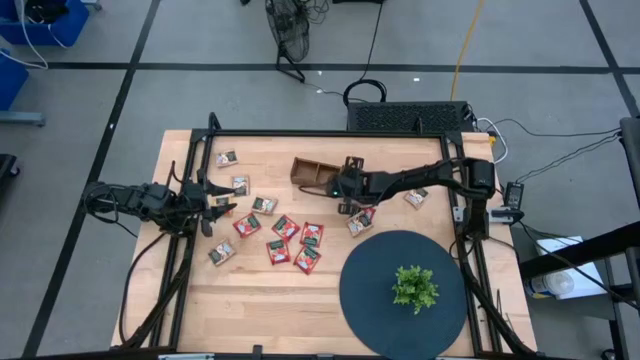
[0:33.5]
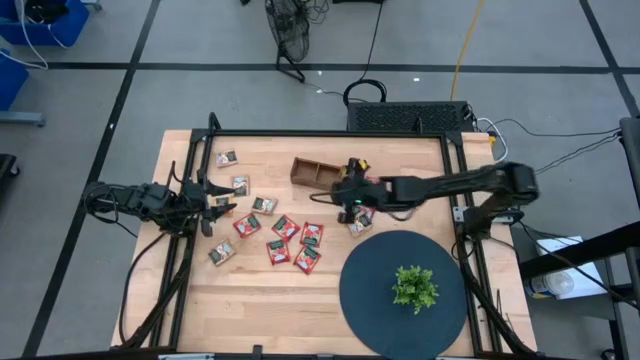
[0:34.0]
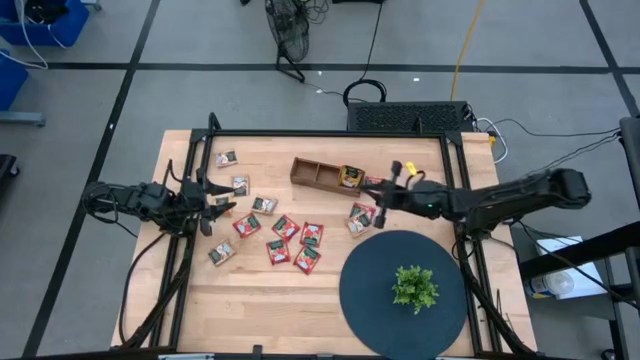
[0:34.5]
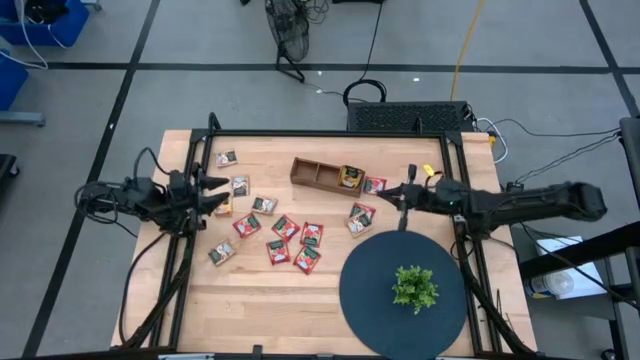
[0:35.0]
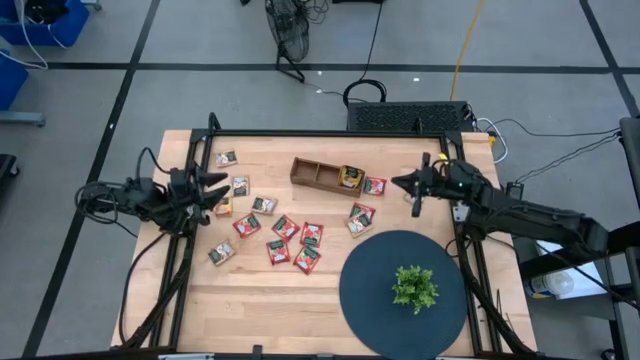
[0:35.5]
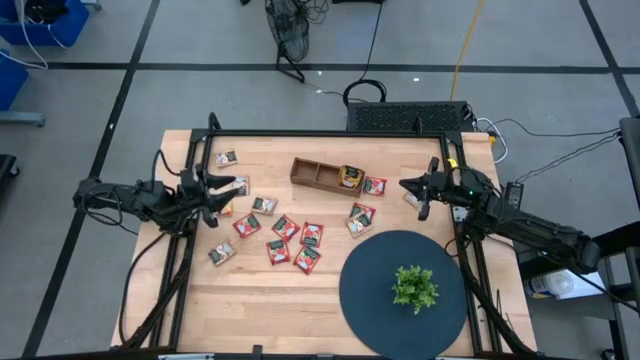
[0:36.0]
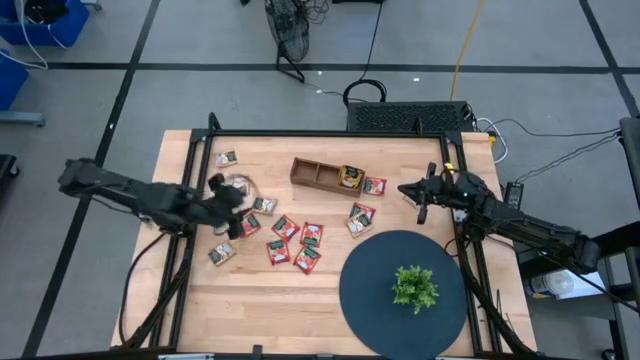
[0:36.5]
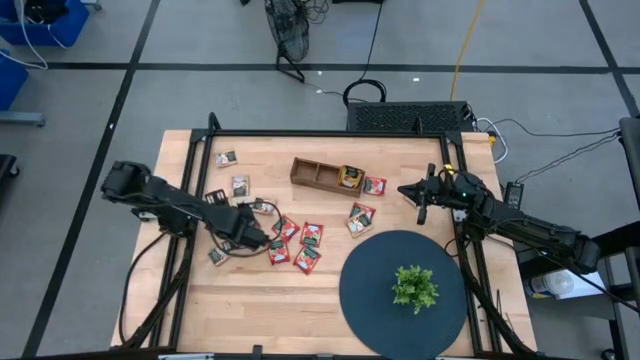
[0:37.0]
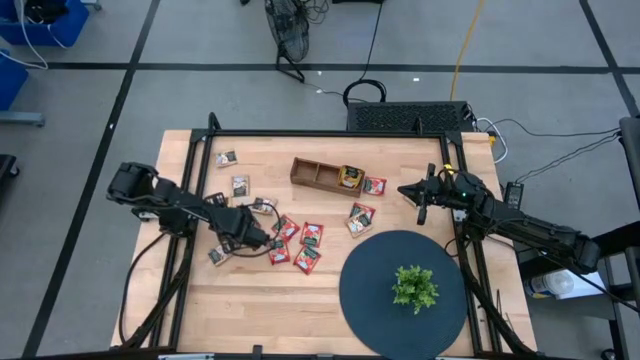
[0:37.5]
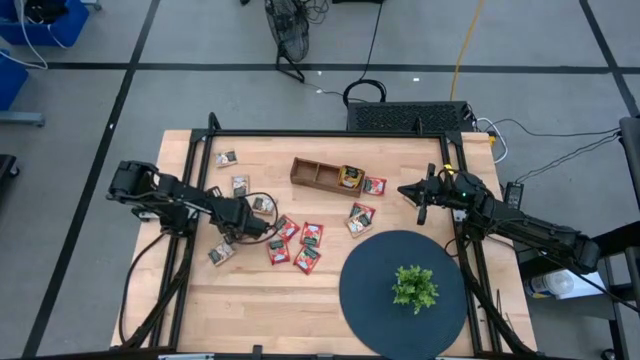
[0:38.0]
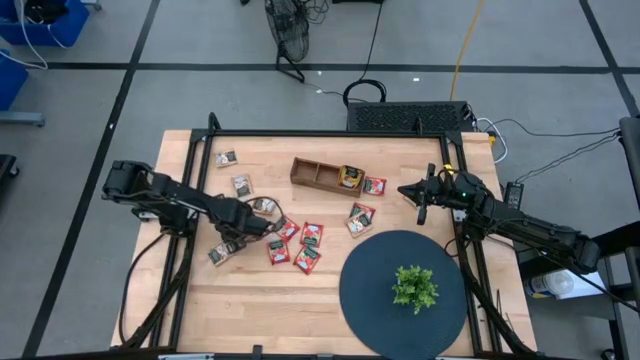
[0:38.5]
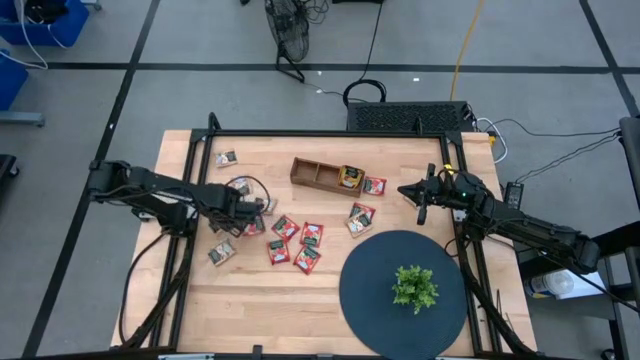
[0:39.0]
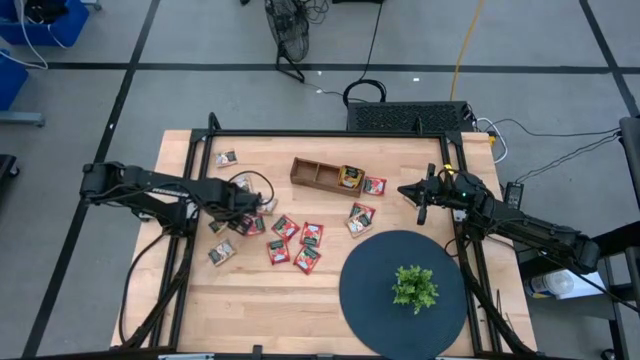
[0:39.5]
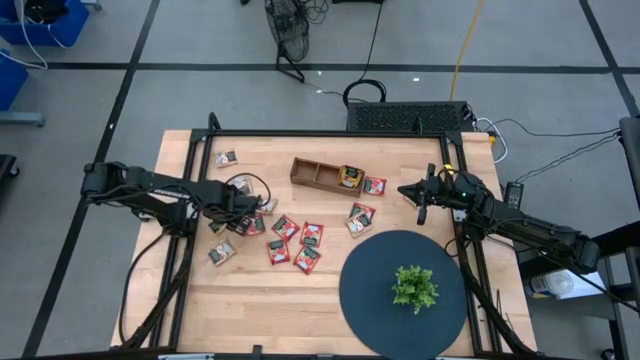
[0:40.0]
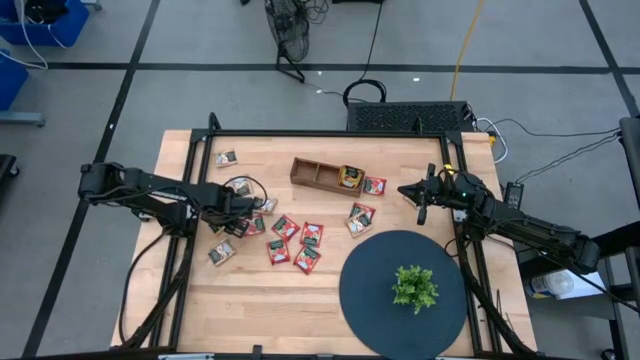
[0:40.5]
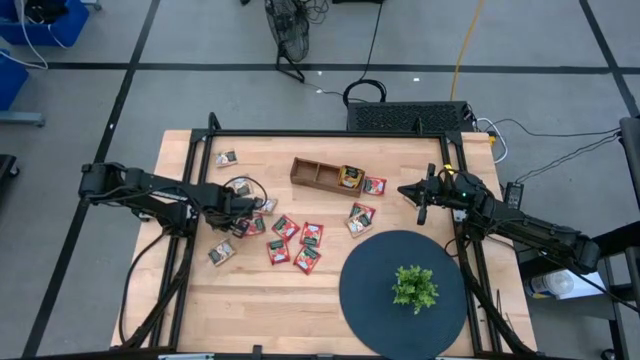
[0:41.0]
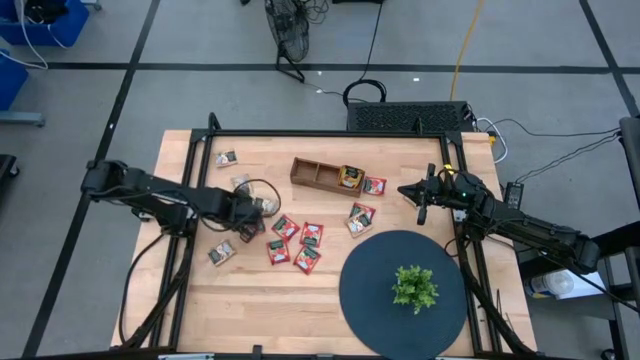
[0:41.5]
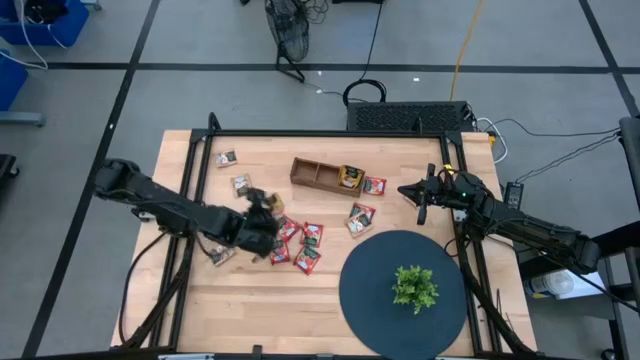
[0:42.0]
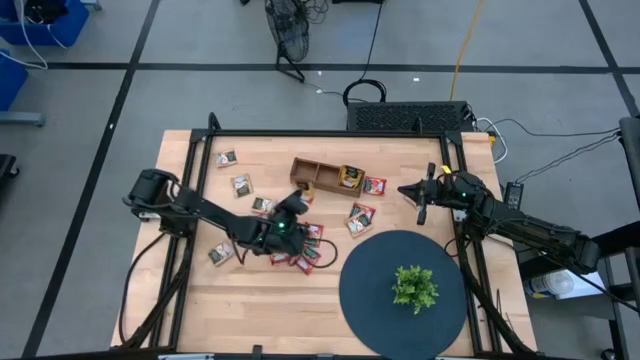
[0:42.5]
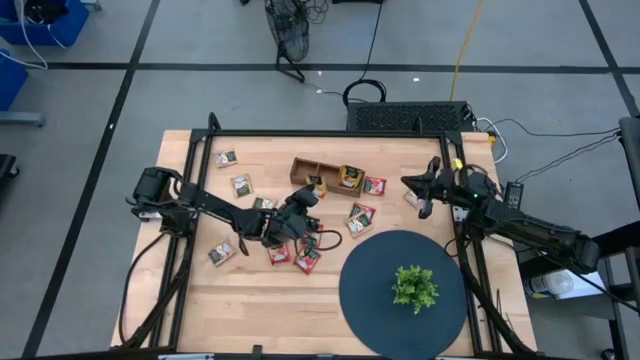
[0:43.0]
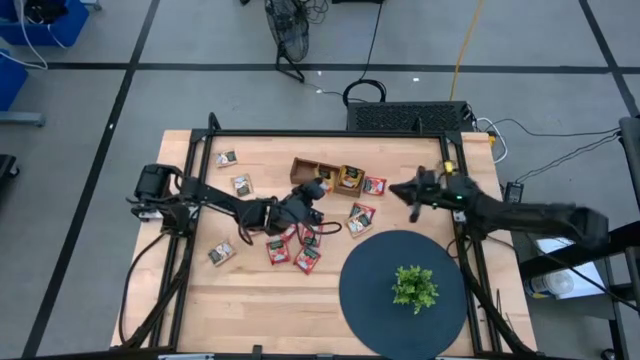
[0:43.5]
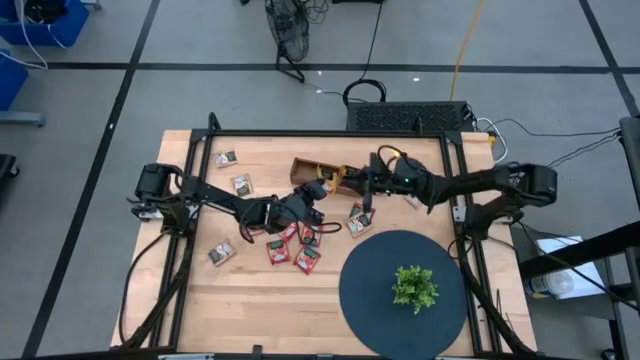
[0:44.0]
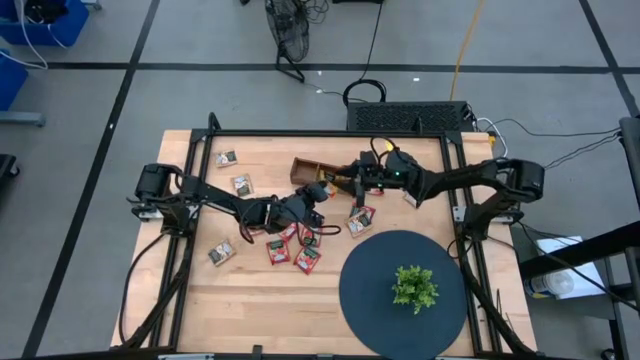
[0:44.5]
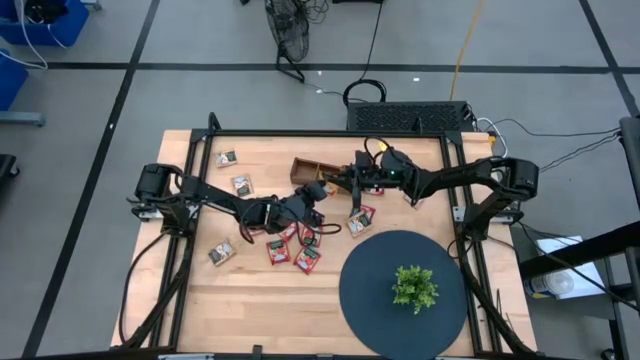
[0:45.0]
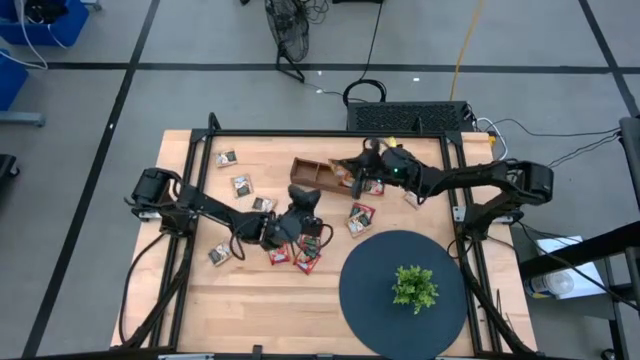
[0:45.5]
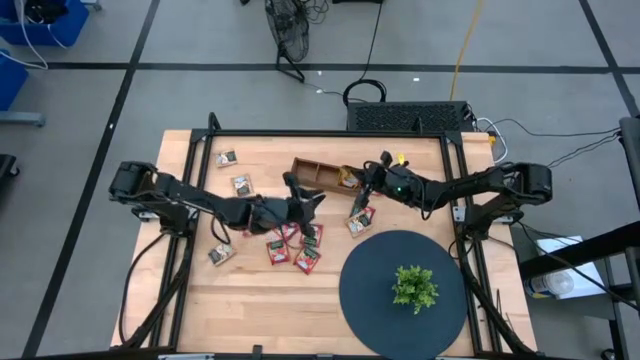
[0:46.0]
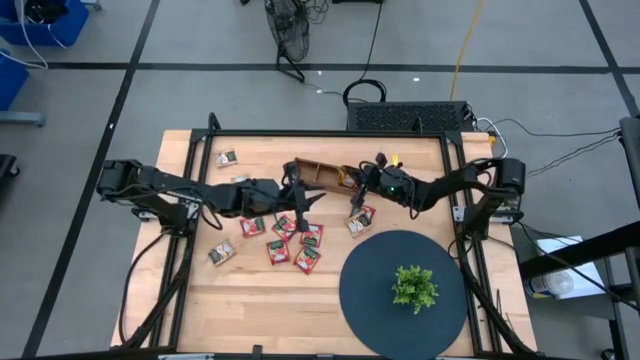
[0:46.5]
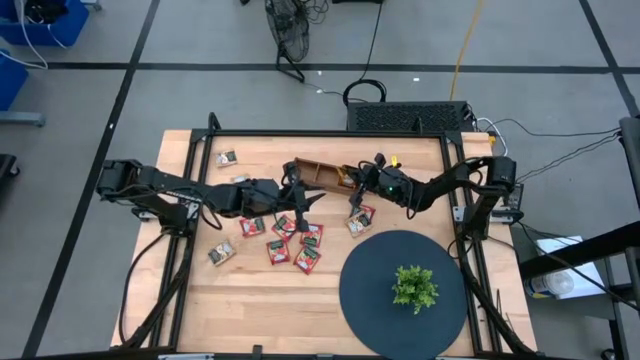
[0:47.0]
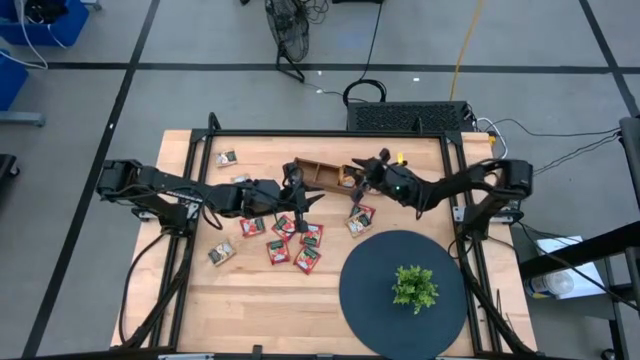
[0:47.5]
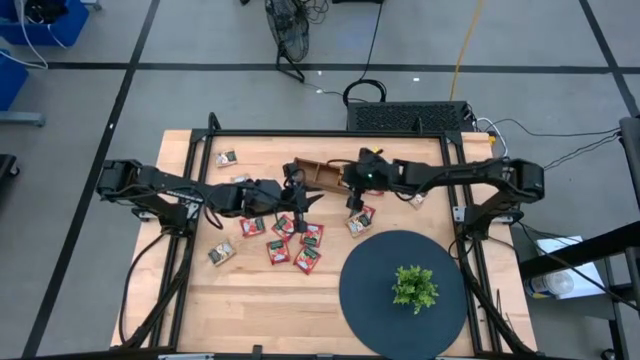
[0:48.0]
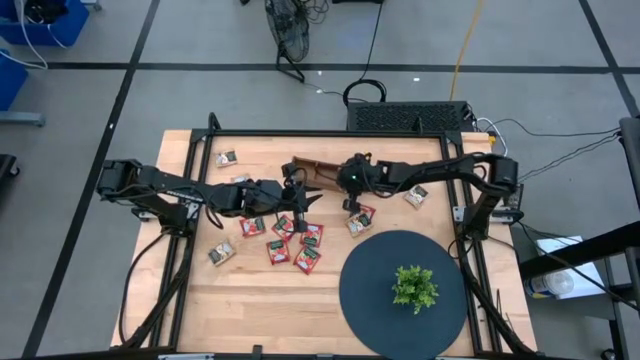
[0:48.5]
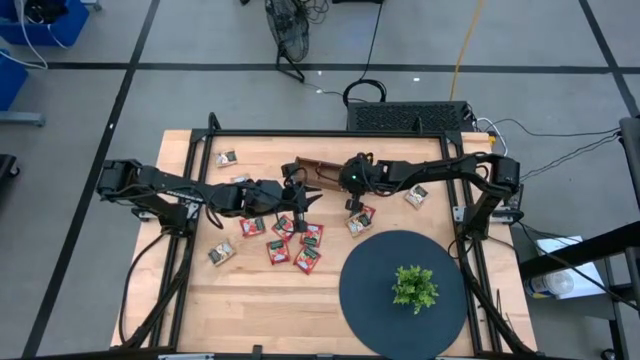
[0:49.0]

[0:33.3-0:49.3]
Task: Pick & Place Tea
Put the yellow tea bag into the right section wooden organizer

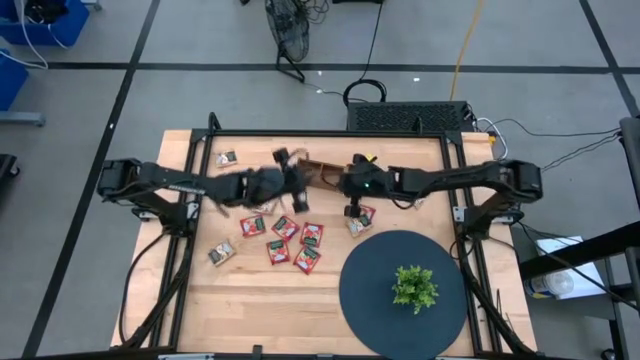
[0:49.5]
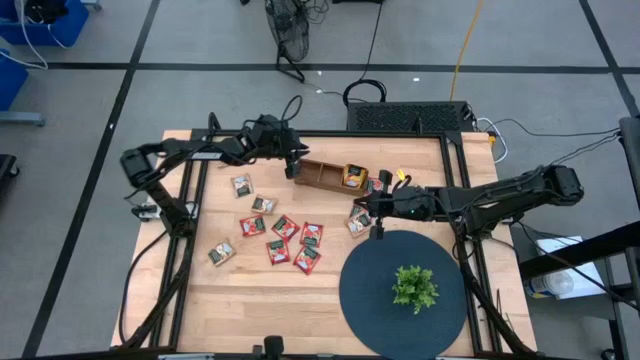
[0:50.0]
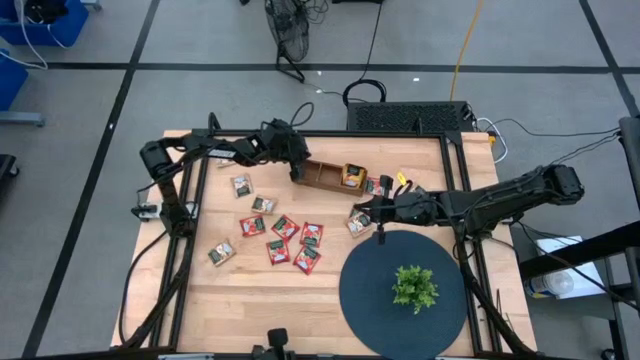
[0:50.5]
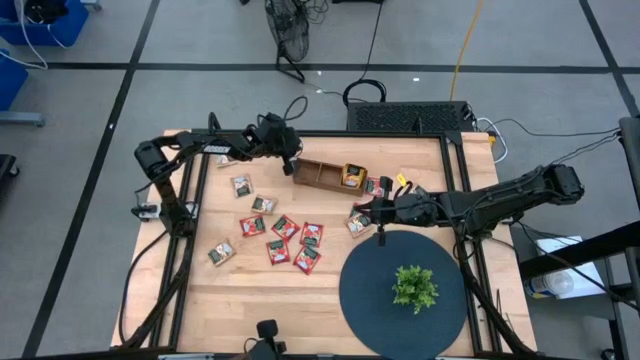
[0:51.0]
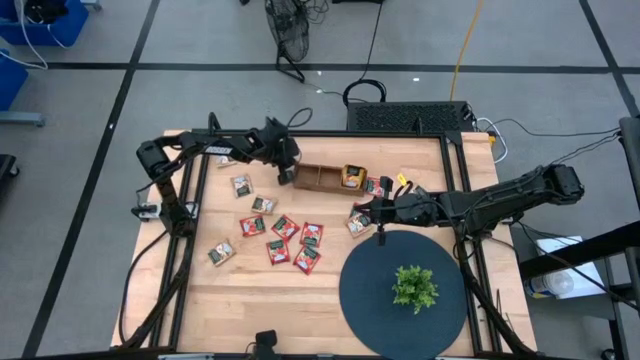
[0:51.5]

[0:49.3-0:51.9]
Adjust the wooden organizer

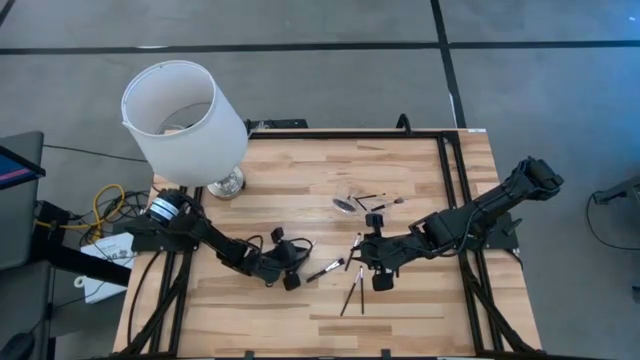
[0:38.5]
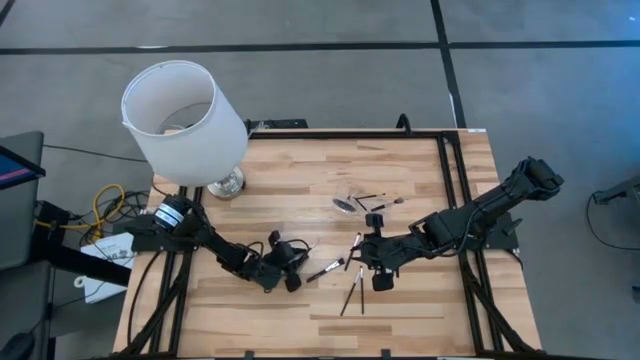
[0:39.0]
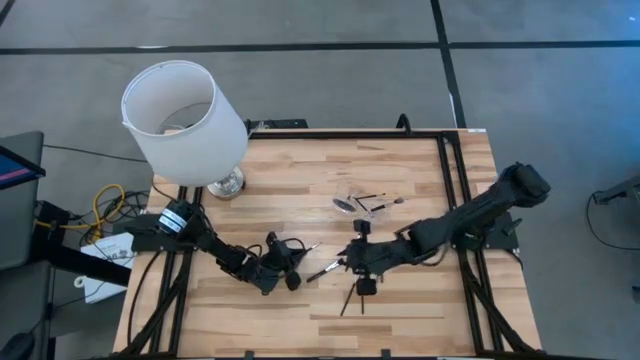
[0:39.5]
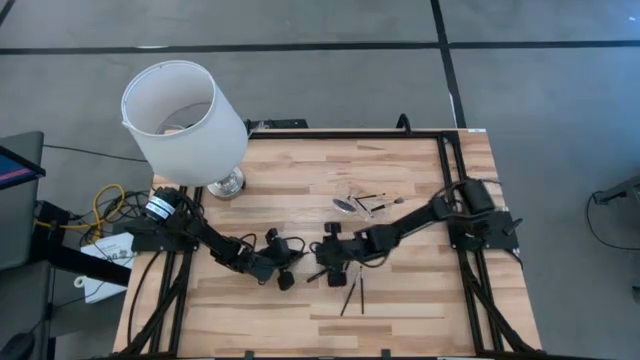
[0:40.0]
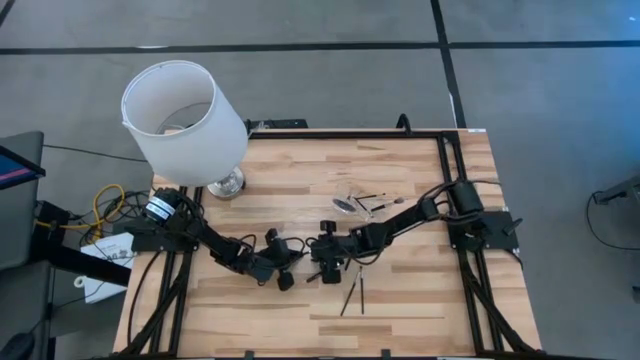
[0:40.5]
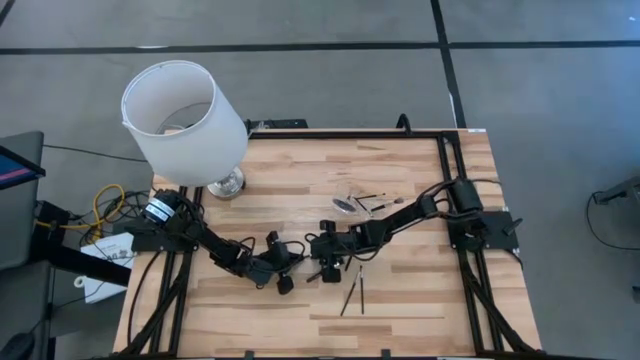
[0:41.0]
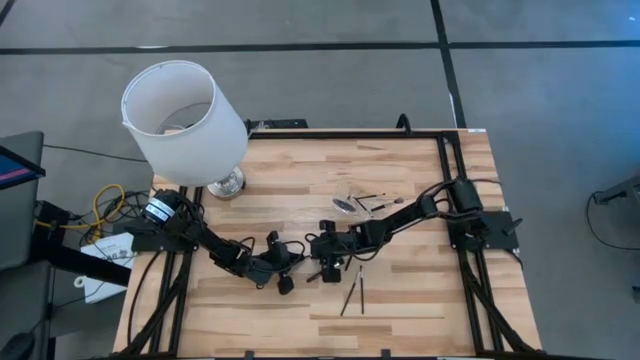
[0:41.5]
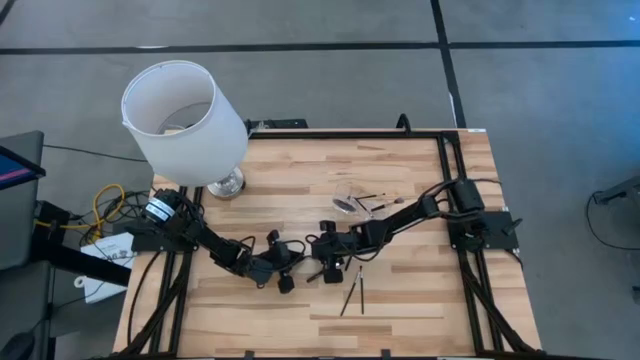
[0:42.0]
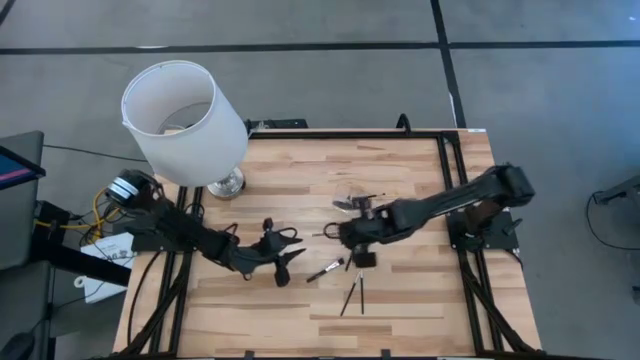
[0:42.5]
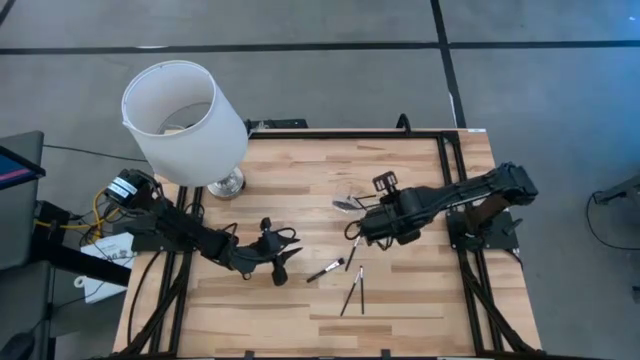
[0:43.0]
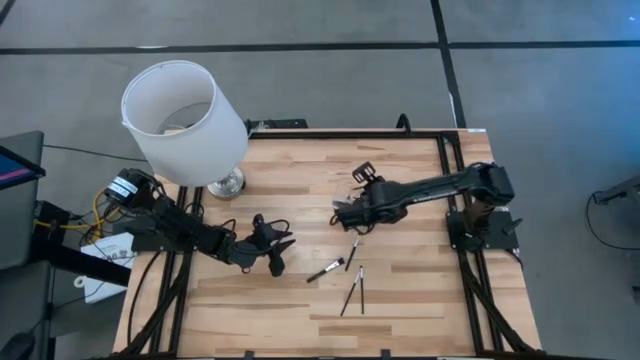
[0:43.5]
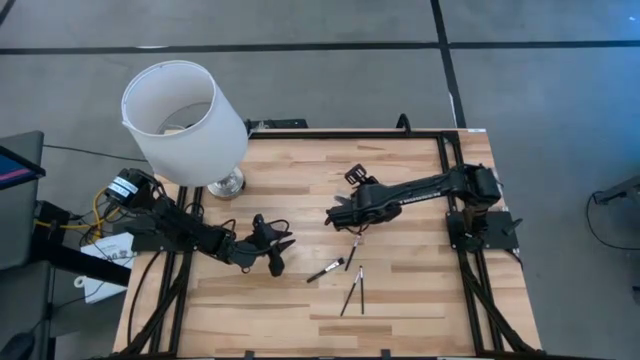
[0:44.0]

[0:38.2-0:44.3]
Task: Put items in baskets/containers
Put the black liner brush into the transparent organizer
